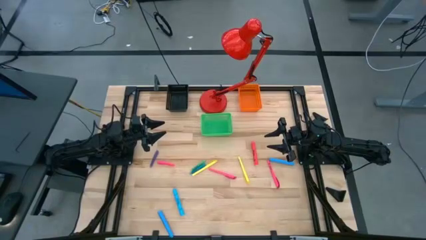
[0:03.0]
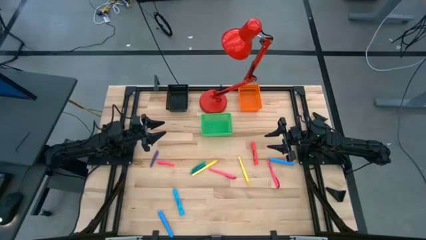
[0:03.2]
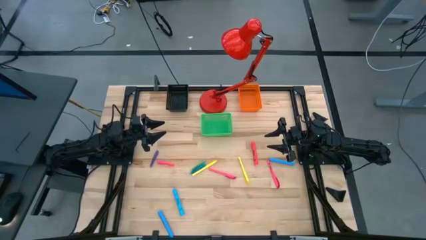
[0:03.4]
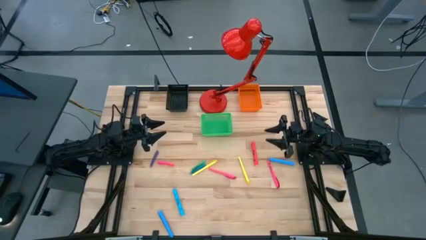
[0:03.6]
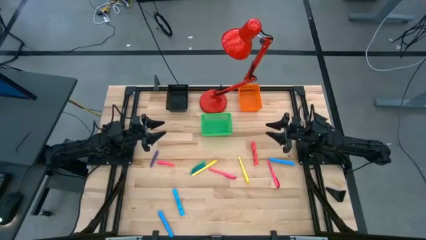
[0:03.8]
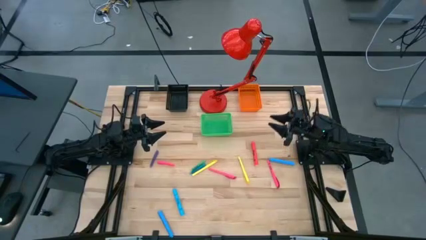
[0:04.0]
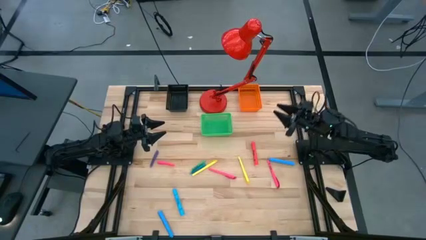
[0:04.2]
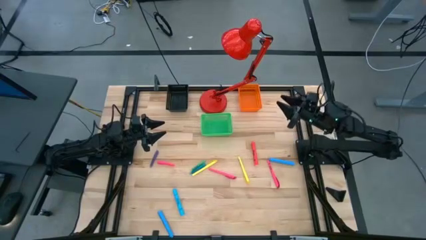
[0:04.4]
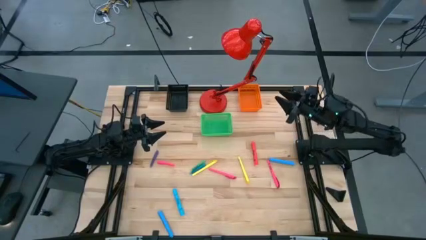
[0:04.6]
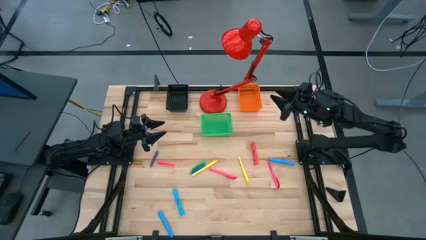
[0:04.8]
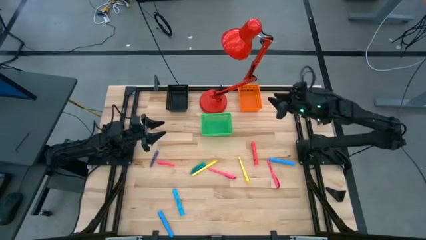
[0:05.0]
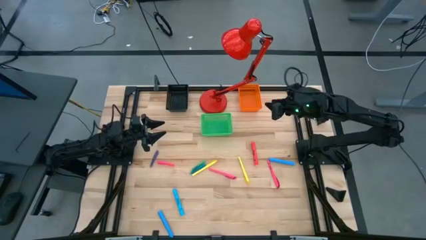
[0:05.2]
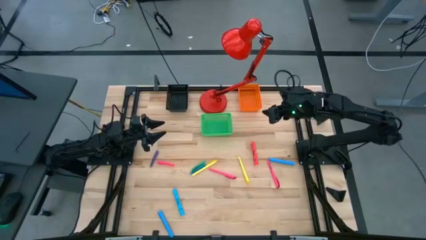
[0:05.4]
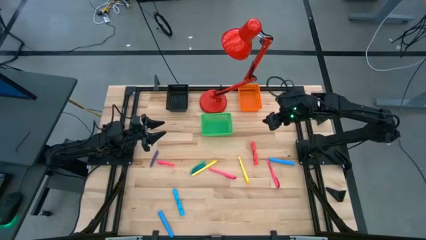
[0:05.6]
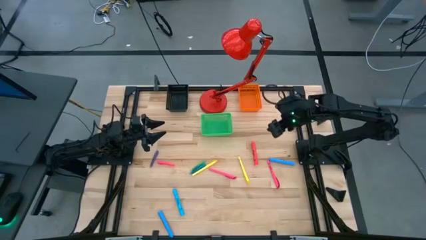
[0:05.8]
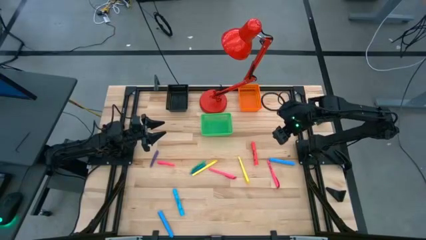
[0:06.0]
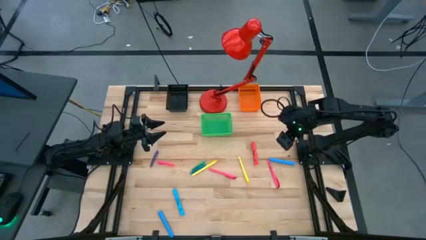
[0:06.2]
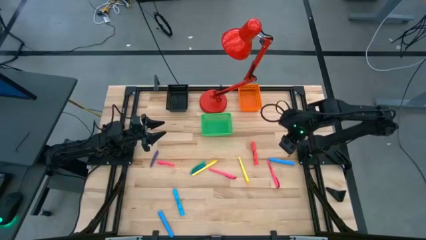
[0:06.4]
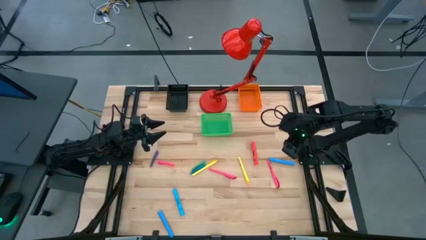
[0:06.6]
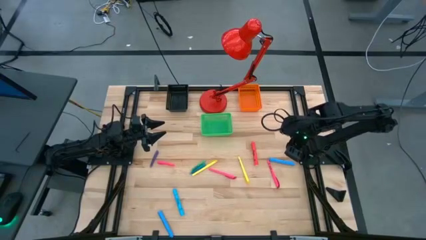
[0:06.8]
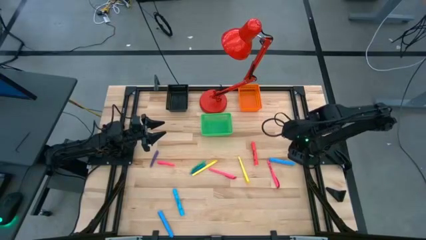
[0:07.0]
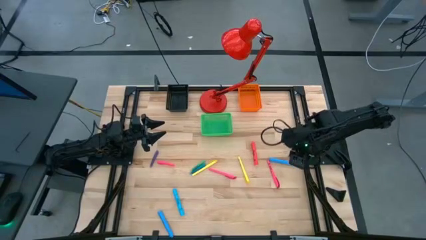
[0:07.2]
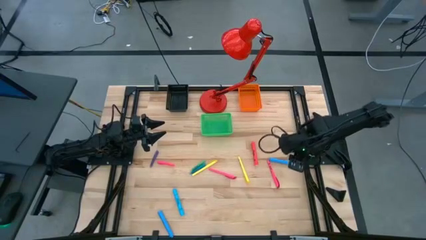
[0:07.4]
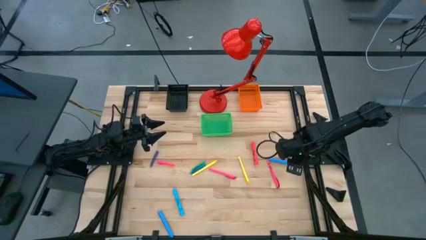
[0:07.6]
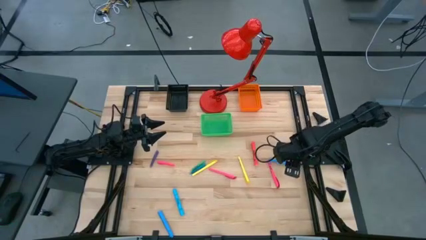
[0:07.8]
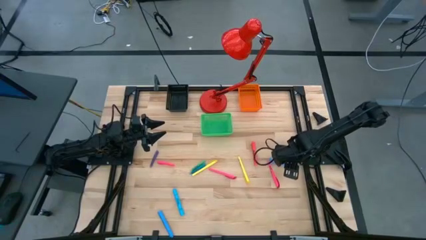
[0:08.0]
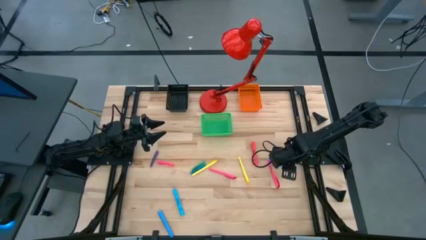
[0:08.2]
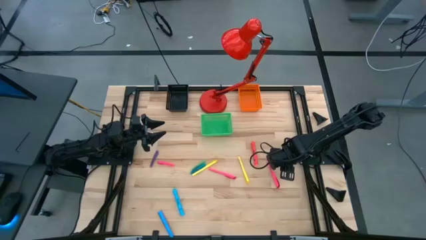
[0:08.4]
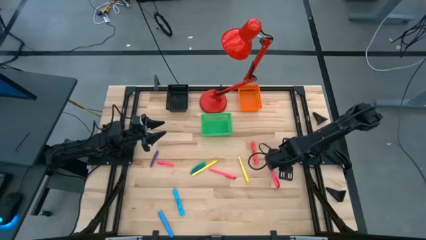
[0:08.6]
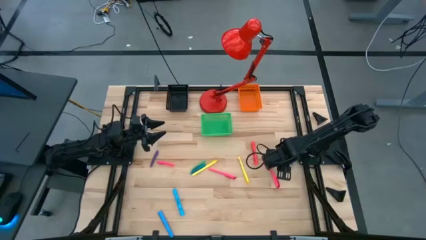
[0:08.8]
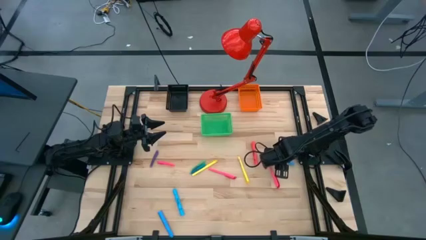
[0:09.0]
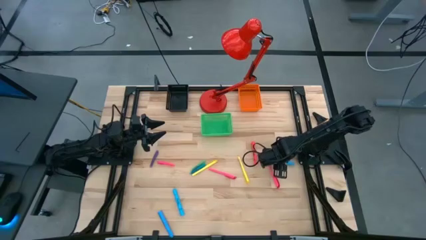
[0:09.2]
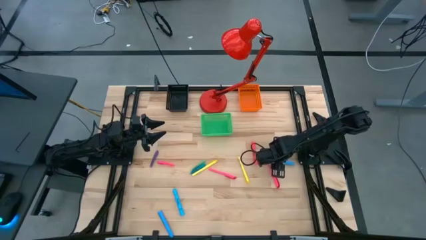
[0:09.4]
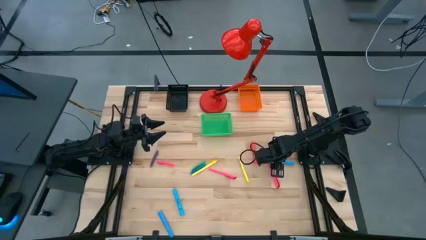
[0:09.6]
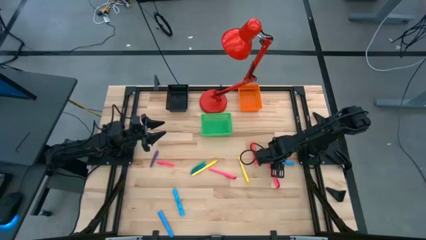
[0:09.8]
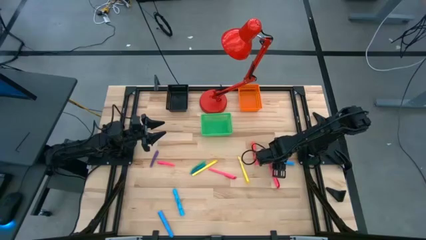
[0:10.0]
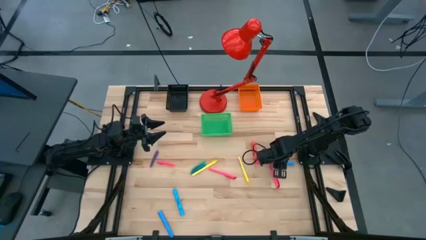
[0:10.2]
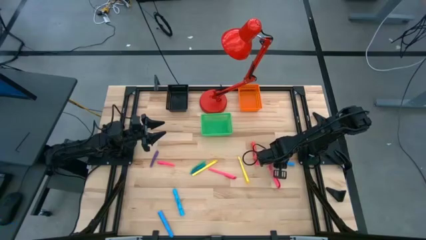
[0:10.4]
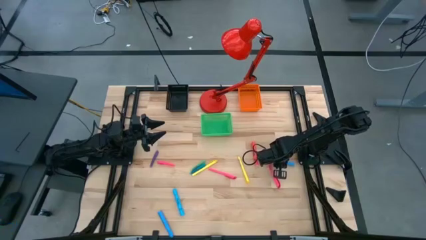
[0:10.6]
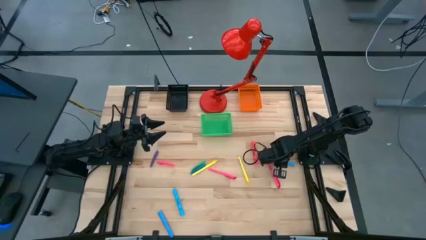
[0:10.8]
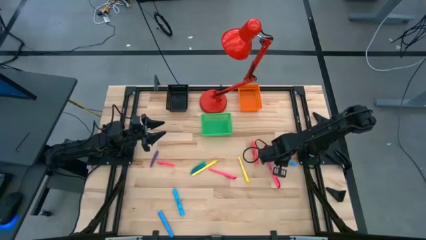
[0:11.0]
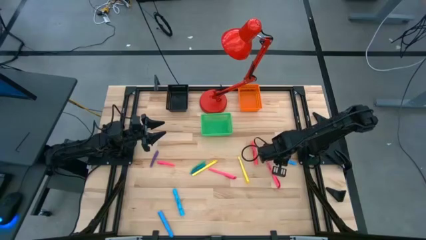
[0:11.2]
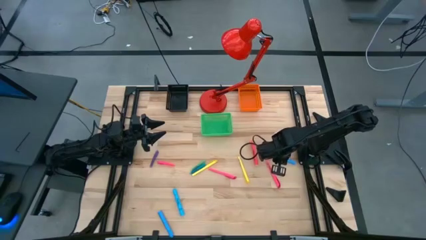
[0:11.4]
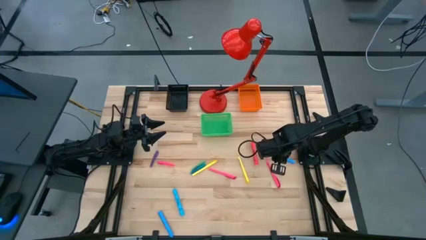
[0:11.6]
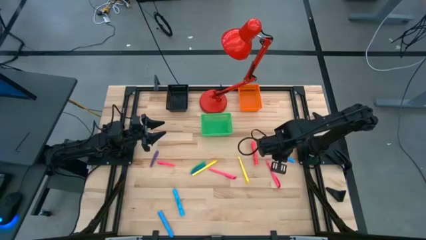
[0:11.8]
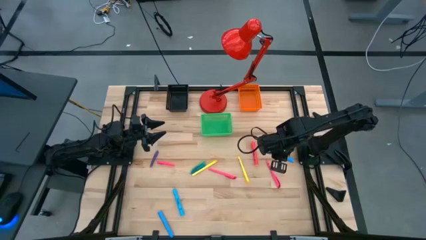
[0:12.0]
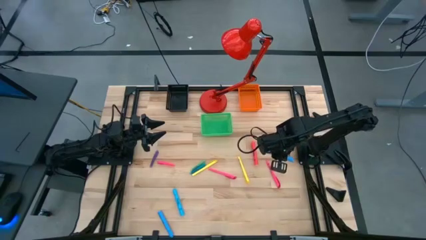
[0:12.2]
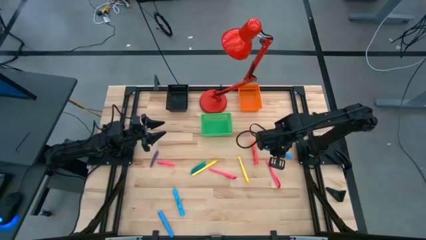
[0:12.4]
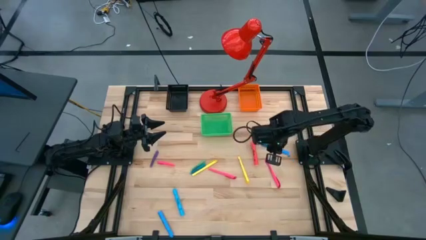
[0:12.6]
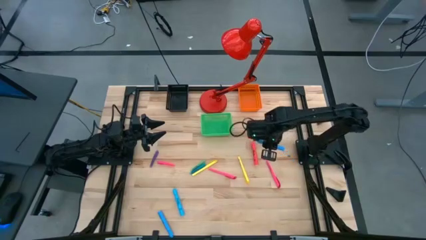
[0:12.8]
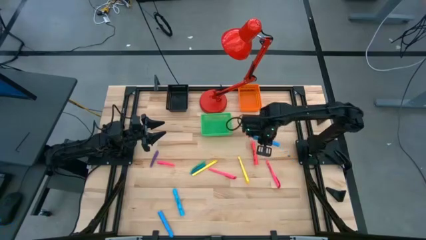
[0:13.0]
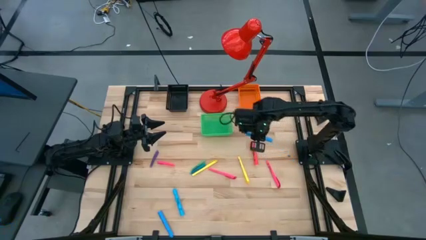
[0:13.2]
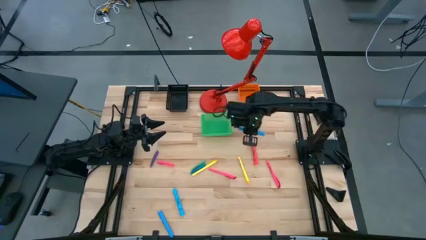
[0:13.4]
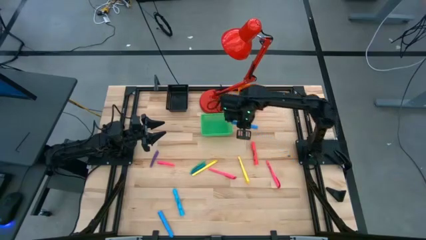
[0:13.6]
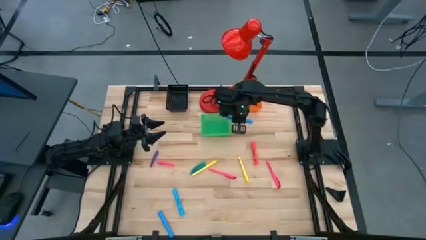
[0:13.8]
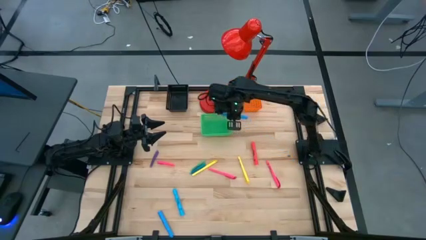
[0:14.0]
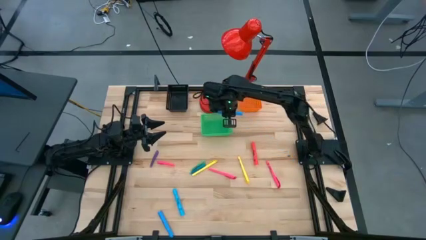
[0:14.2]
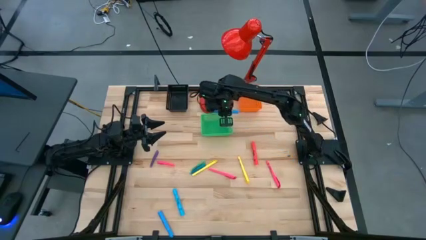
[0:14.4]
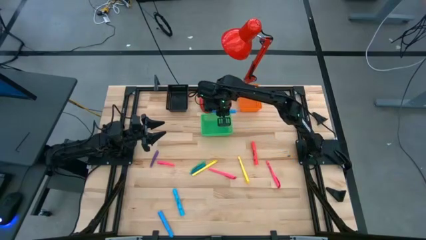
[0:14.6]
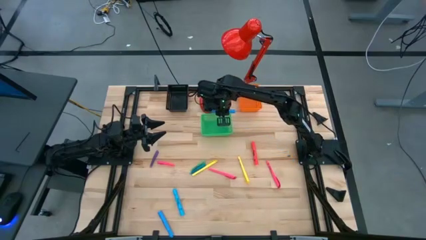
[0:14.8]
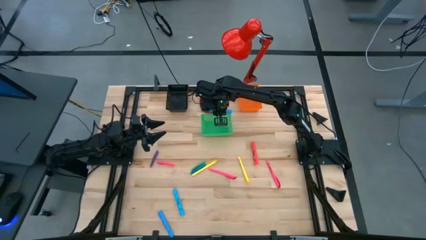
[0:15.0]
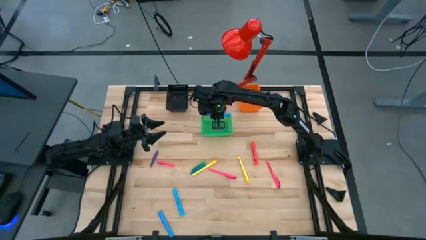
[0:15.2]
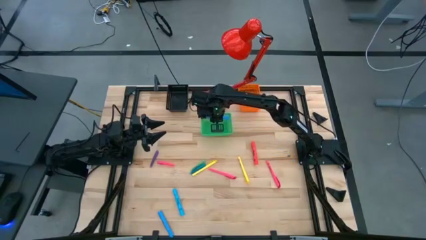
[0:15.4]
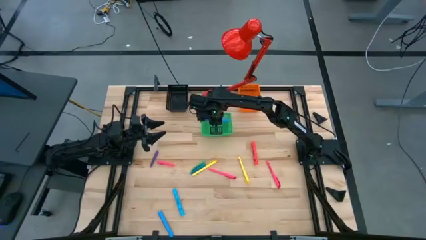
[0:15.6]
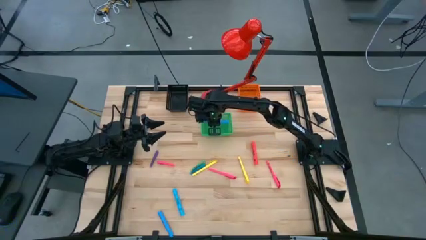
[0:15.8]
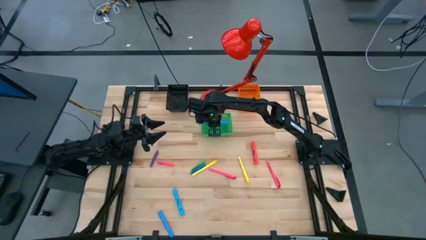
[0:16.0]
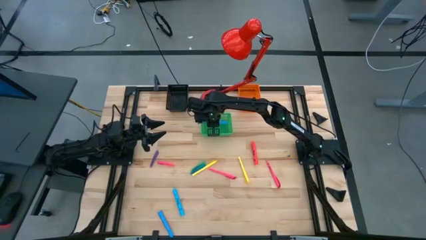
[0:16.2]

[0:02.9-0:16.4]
Task: Pick & Place Markers
Put the big blue highlighter into the green basket
